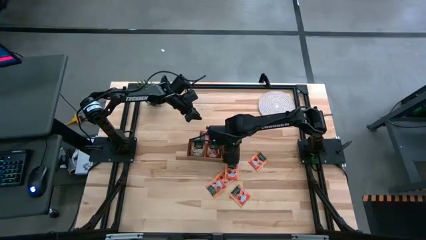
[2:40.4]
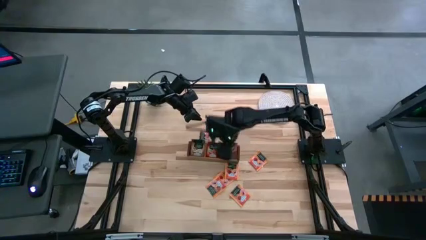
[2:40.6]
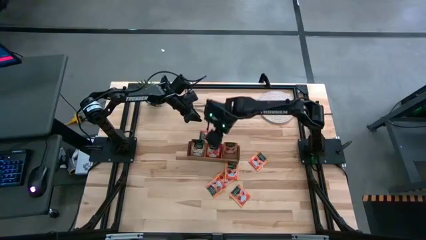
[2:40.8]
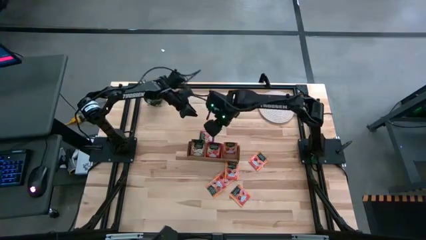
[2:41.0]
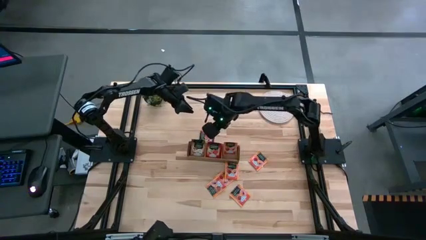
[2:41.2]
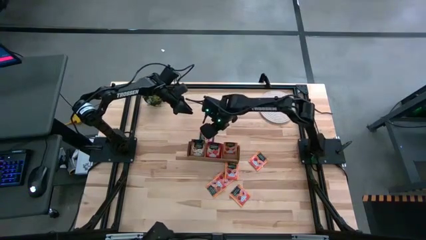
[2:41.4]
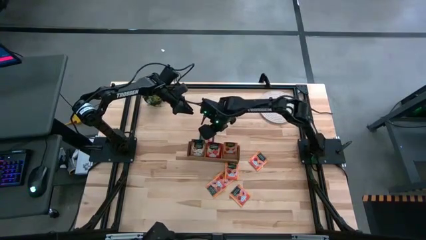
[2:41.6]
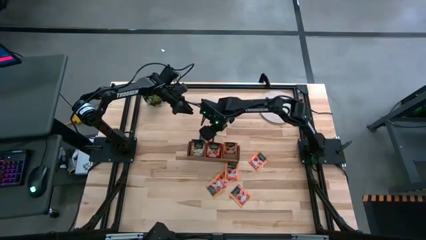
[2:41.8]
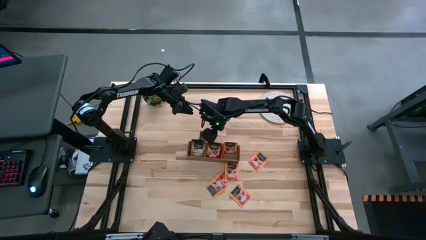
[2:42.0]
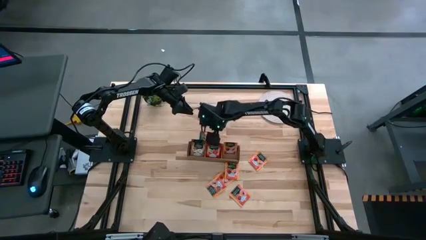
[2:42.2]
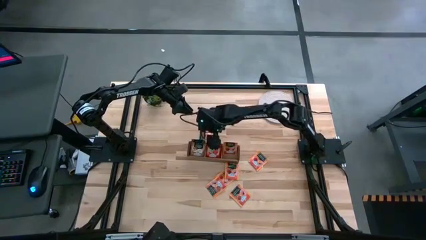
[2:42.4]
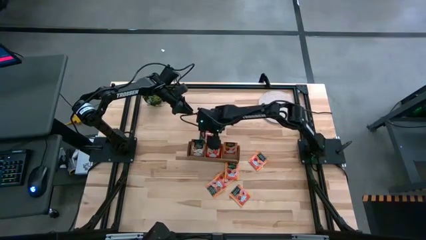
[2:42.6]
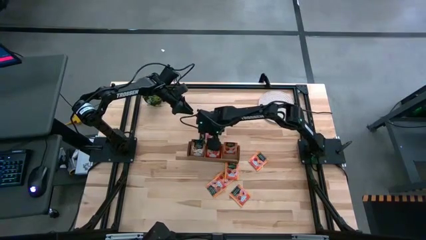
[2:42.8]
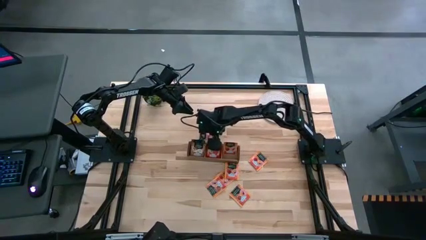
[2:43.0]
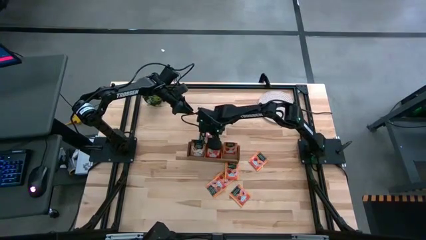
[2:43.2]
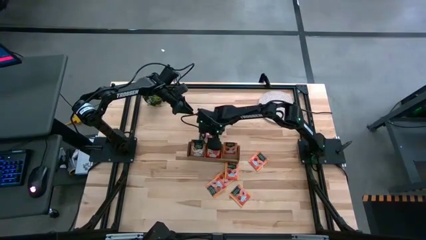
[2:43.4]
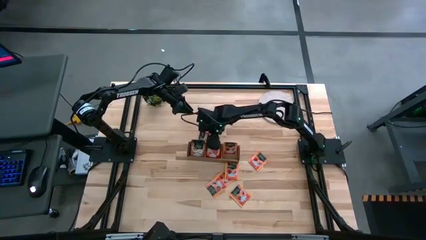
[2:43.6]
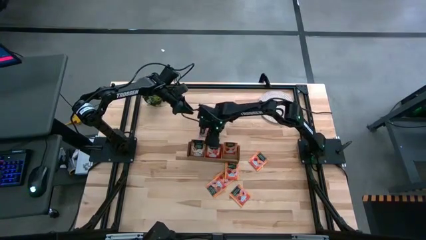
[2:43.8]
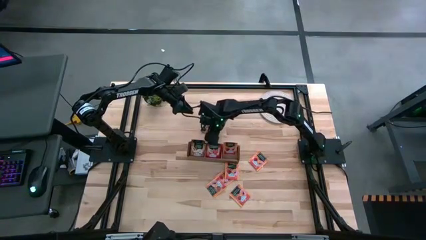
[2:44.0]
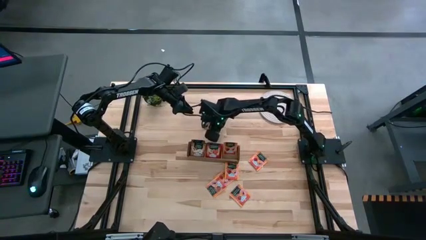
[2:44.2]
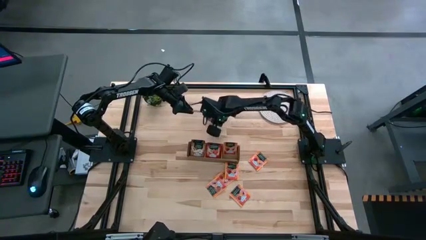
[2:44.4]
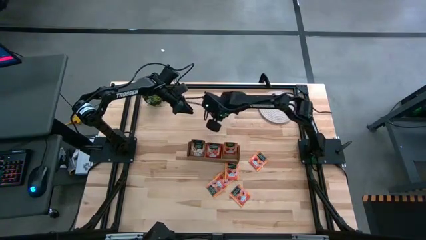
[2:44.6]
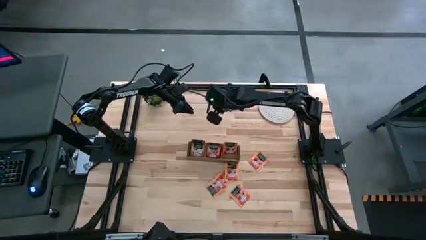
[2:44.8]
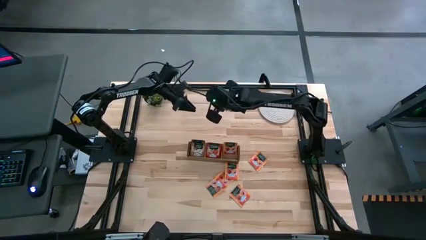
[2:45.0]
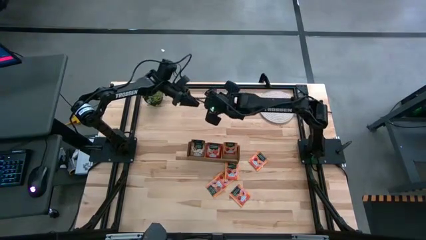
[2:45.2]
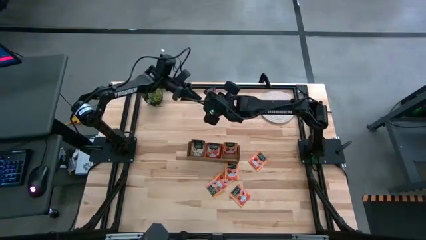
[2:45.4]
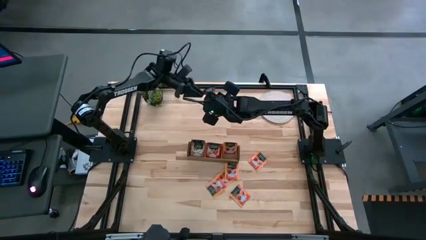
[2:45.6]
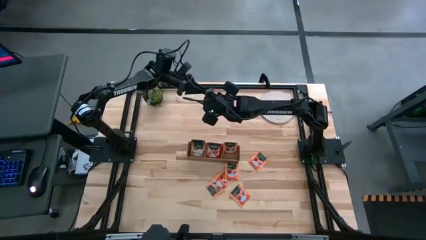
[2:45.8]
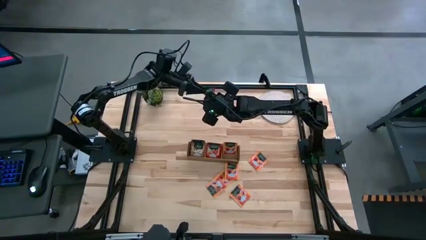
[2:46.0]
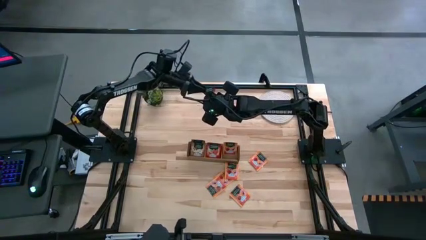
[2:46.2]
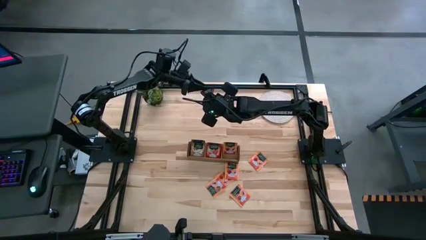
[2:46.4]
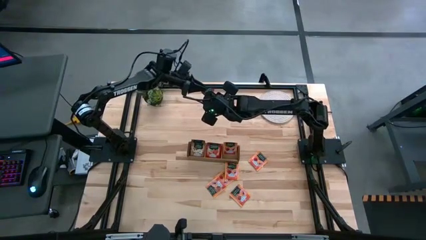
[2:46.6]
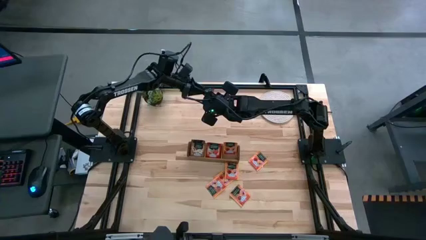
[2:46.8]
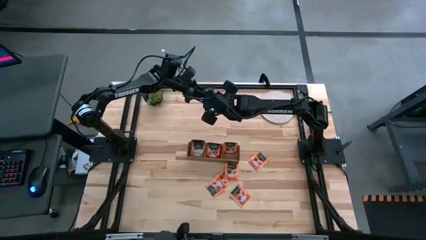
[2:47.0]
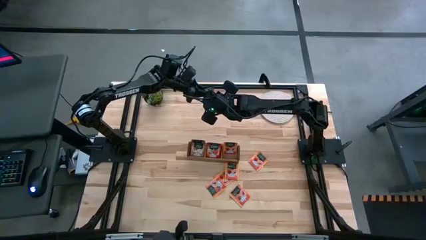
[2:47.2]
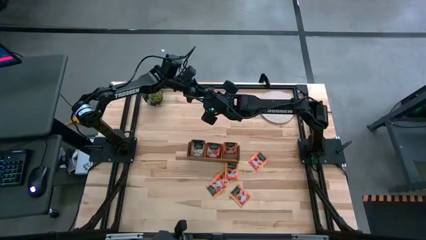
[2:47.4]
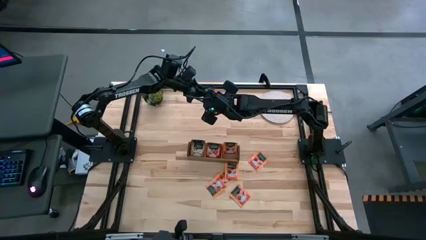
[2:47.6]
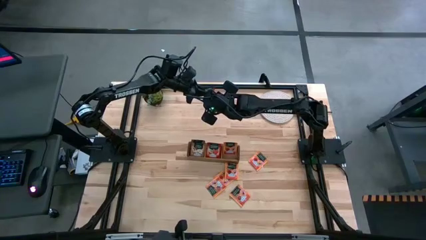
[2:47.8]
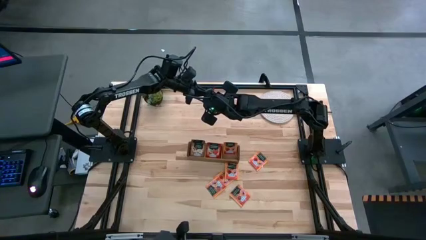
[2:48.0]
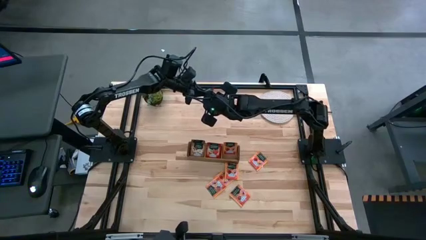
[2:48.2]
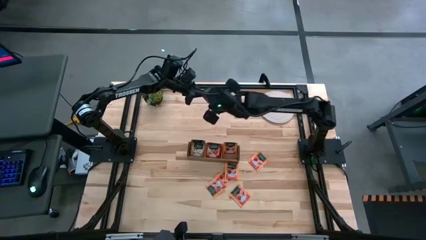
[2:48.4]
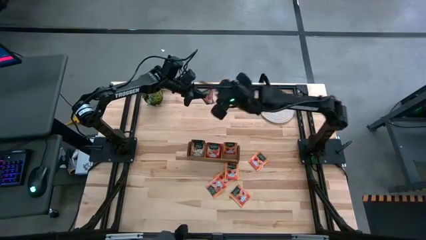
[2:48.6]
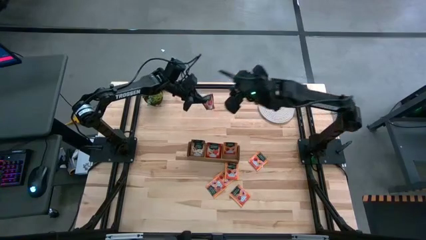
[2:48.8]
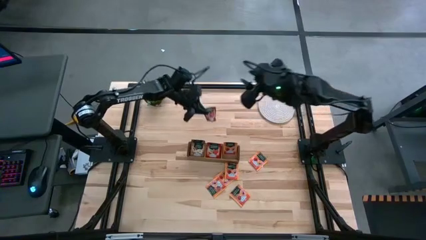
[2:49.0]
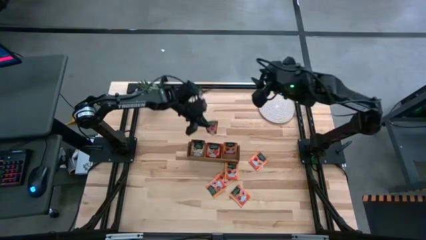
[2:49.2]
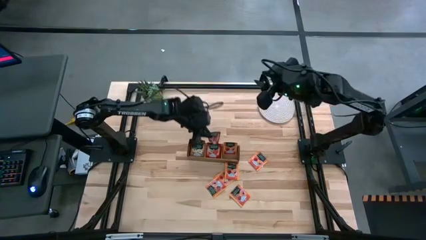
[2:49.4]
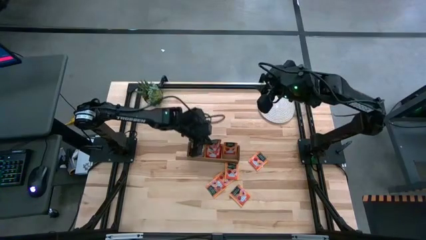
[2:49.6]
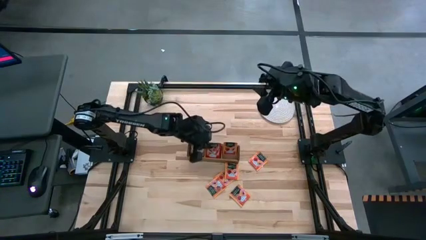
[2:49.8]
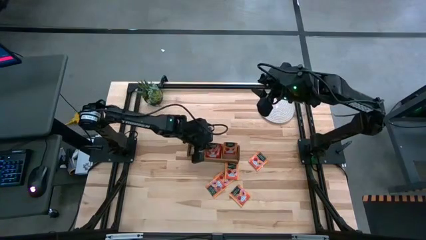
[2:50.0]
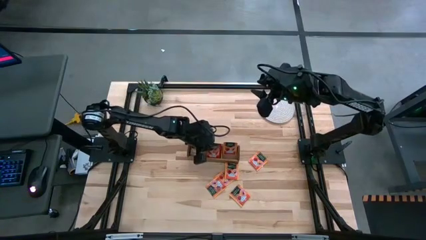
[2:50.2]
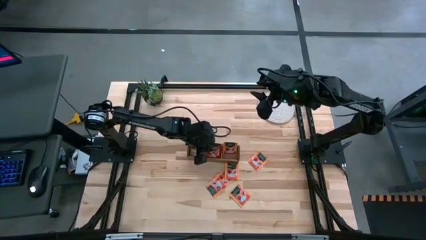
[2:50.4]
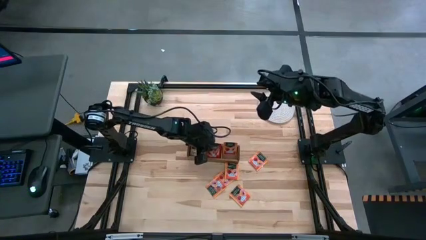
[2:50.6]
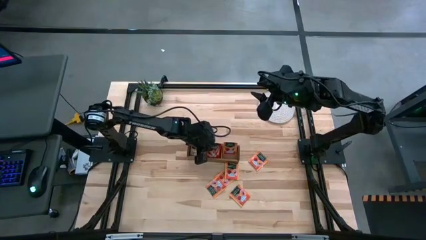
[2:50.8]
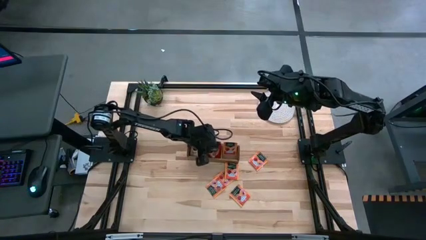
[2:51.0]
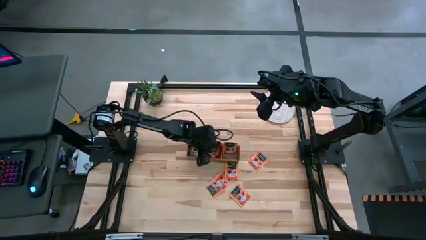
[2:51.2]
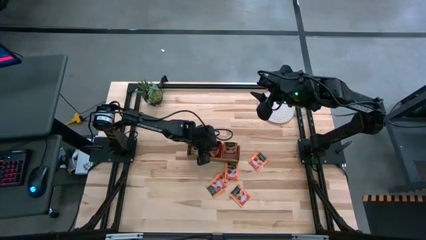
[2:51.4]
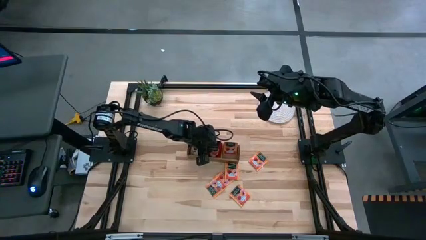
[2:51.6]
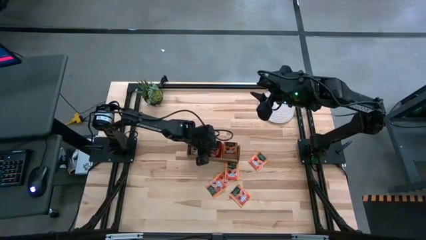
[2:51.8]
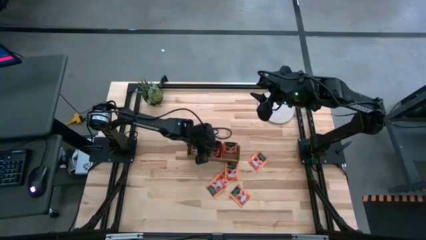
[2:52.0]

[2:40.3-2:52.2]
Task: Pick & Place Tea
Put the red tea bag into the middle section of the brown wooden organizer
